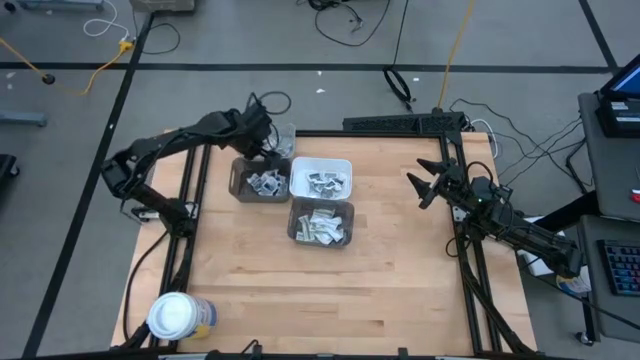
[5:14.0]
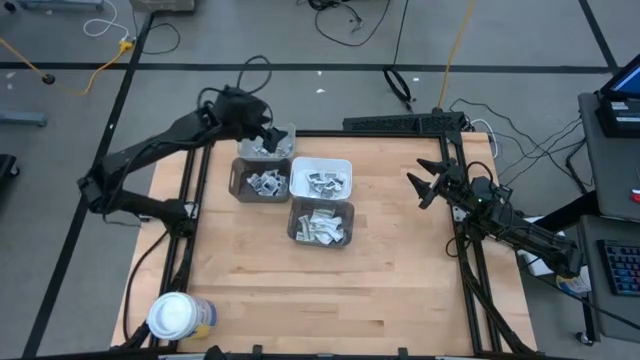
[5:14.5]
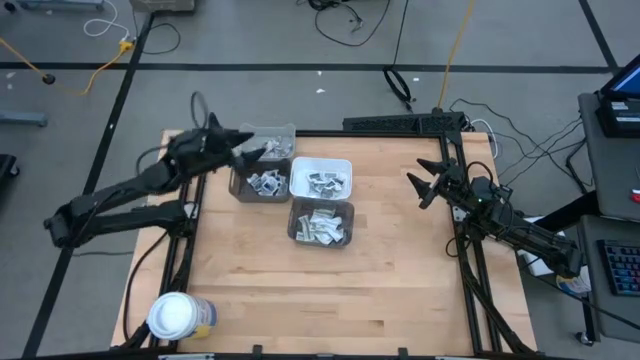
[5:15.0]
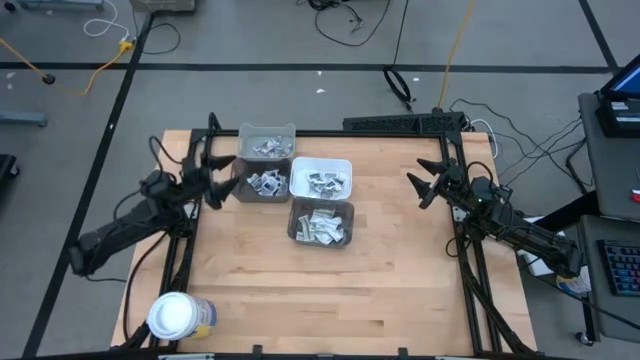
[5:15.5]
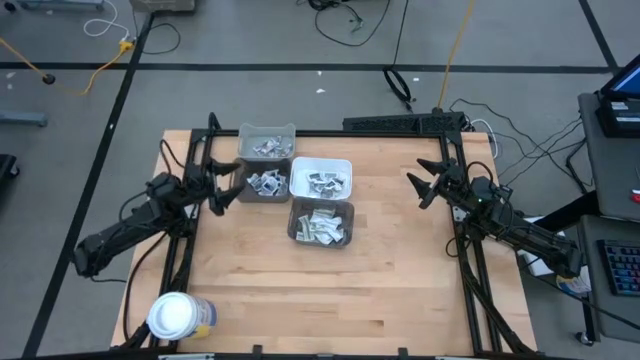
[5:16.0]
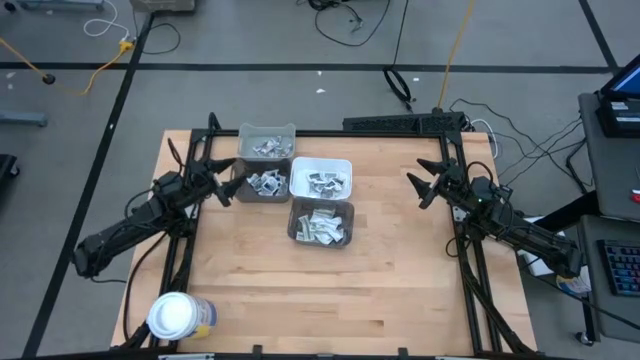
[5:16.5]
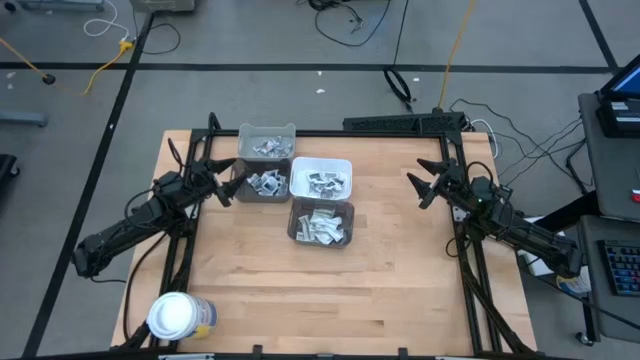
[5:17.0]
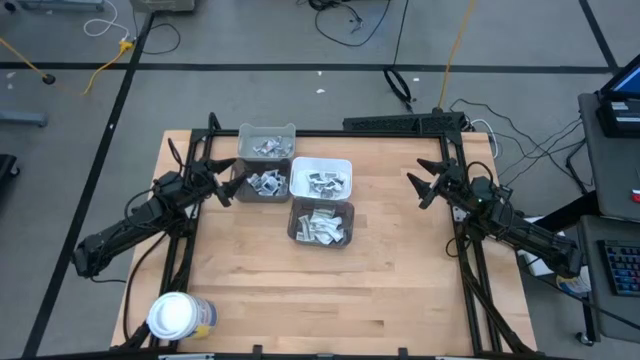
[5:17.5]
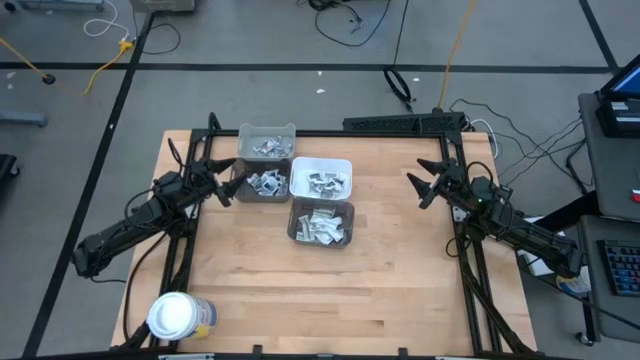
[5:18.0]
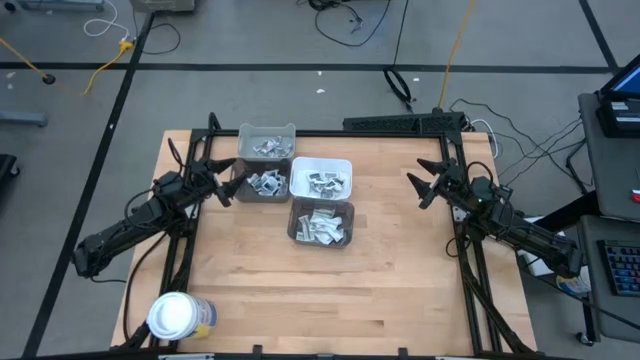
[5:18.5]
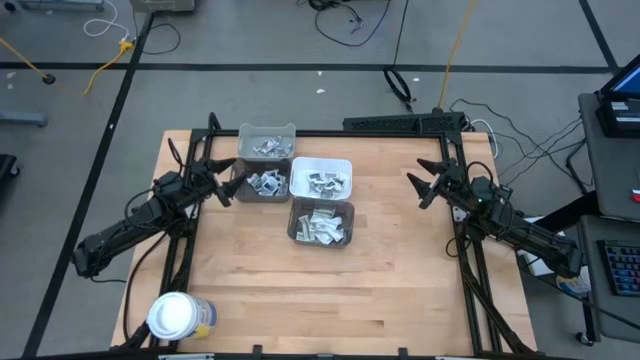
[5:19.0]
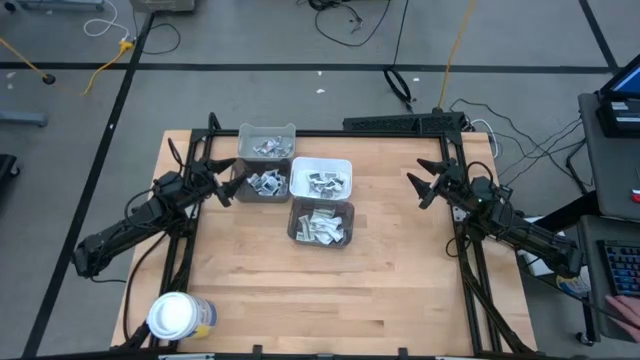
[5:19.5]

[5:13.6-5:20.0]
Task: Pick & Place First Aid Supplies
Return to Home Position
